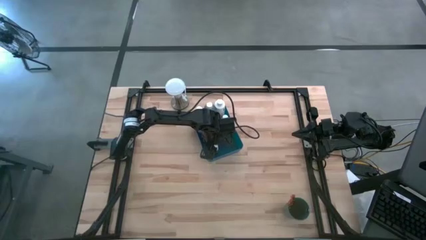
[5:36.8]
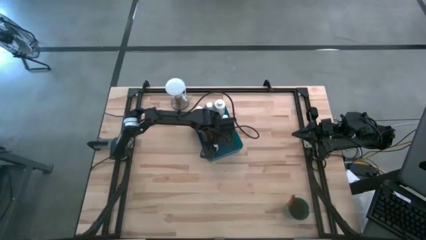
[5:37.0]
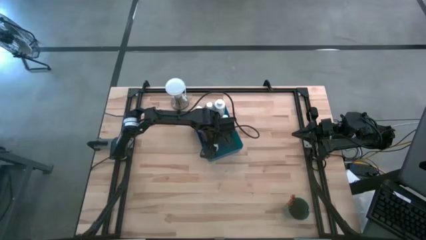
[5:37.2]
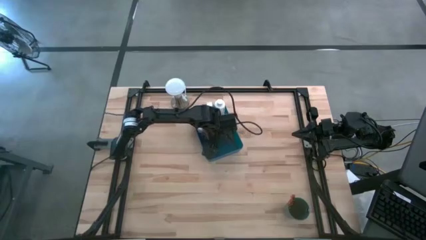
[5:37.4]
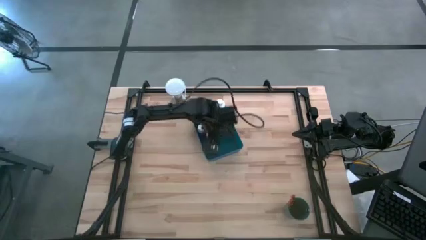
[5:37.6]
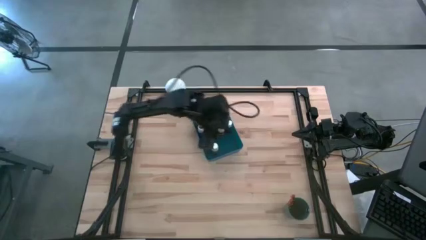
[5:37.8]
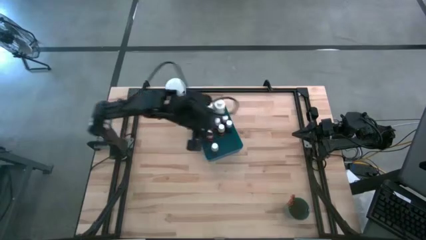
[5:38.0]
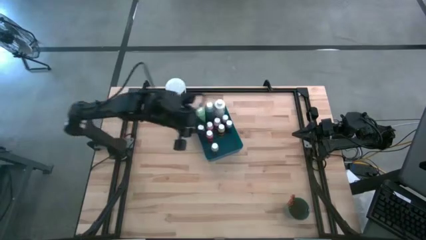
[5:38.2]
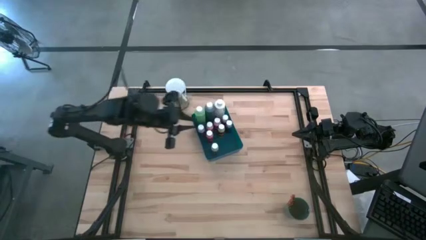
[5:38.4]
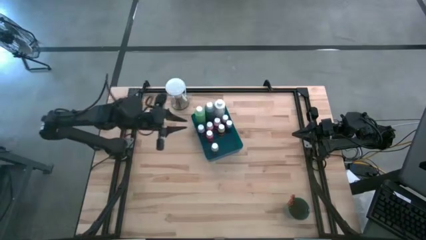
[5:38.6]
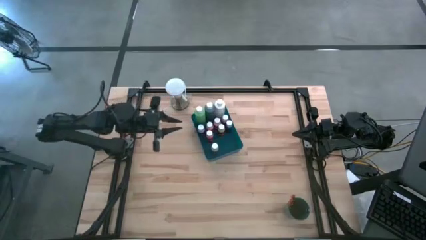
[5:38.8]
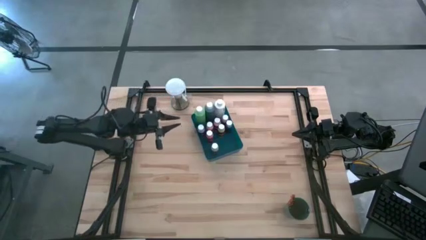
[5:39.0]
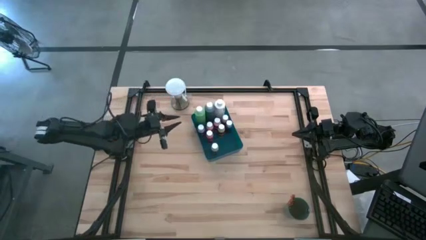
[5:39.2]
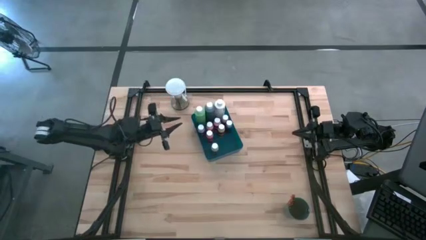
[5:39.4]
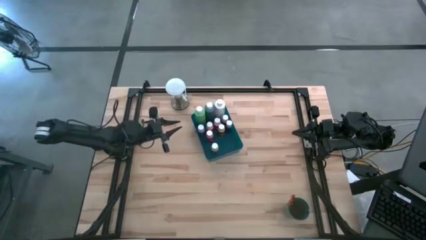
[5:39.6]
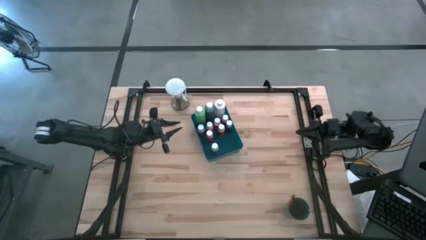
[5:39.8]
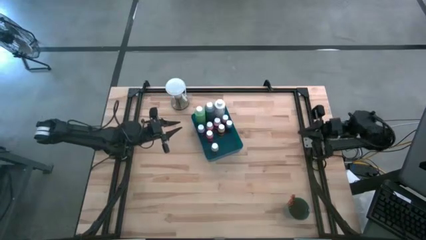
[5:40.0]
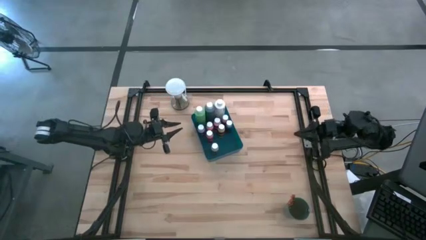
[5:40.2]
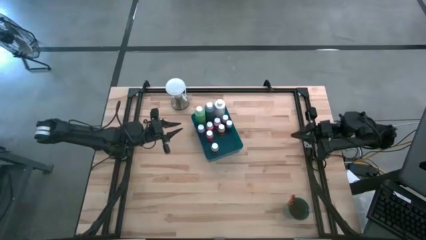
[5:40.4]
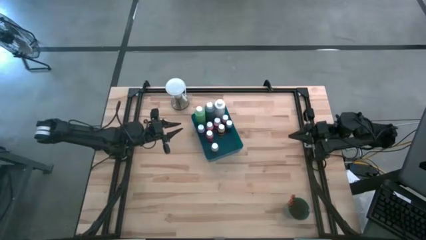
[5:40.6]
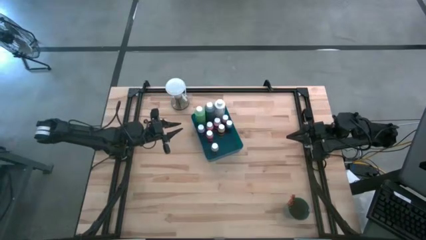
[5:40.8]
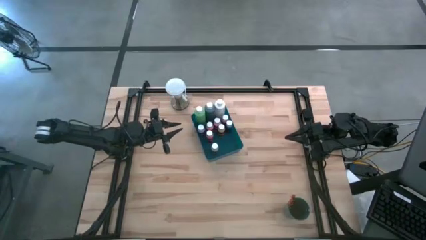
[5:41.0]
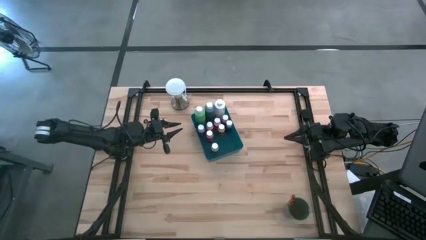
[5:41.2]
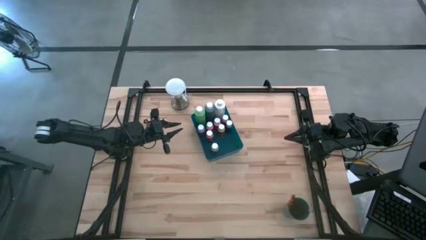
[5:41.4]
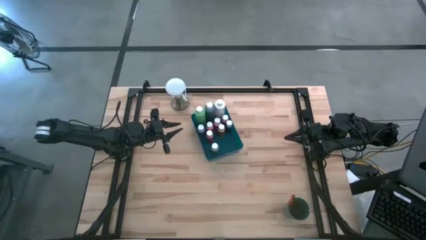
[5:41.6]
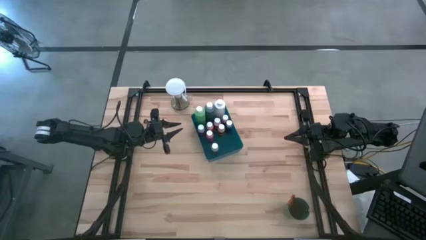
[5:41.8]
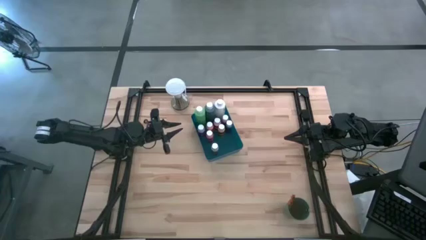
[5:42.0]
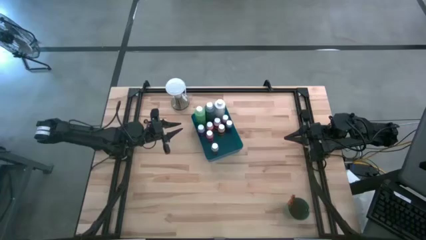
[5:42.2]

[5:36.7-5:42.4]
Task: Pick & Place Paint Supplies
Return to Home Position

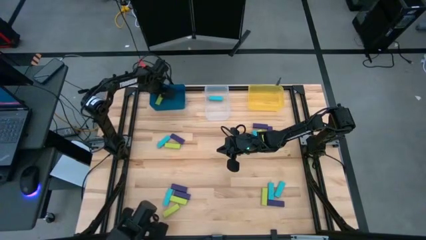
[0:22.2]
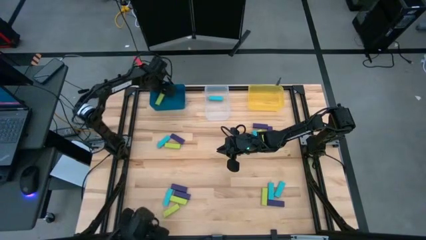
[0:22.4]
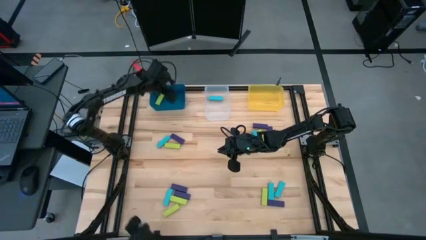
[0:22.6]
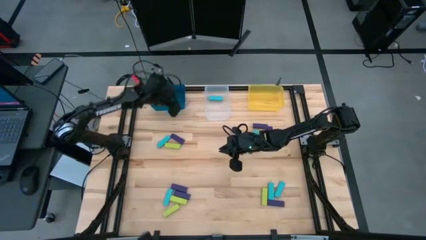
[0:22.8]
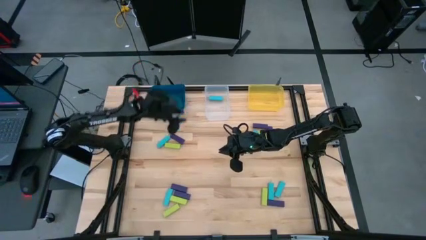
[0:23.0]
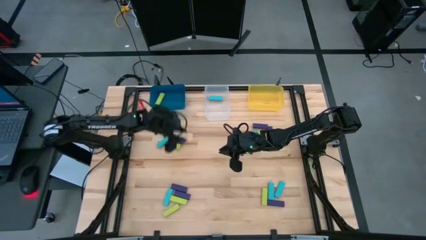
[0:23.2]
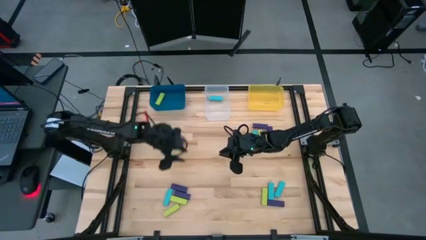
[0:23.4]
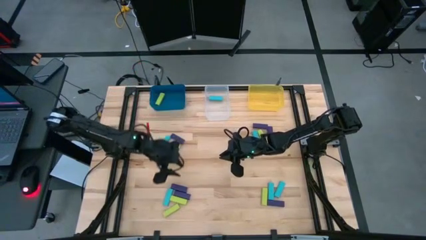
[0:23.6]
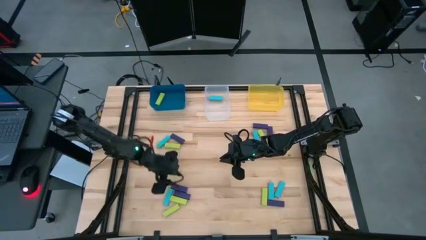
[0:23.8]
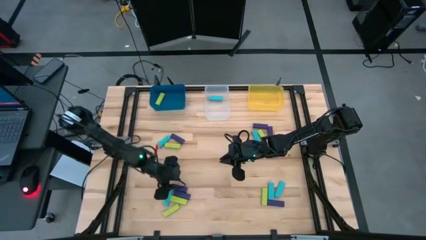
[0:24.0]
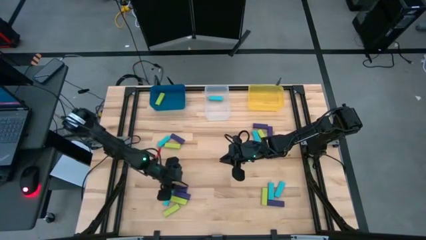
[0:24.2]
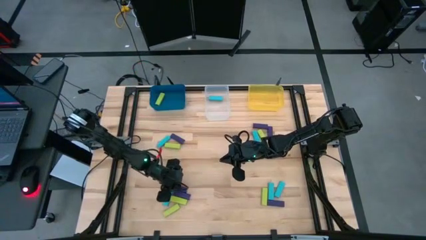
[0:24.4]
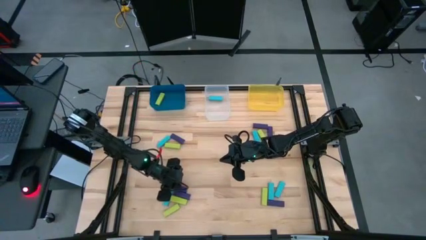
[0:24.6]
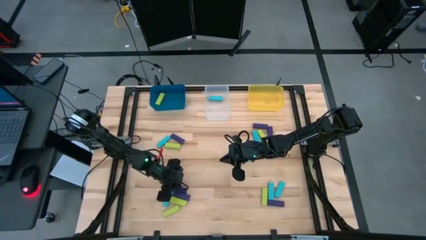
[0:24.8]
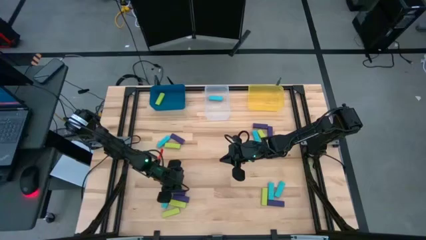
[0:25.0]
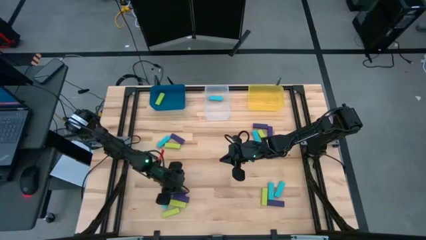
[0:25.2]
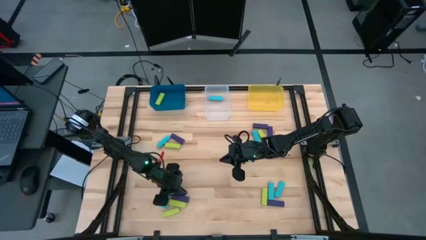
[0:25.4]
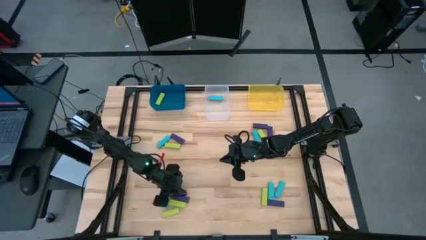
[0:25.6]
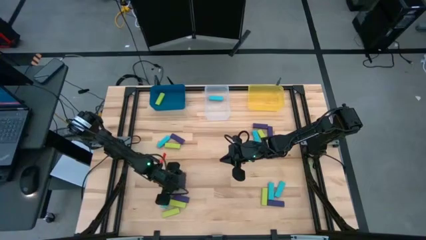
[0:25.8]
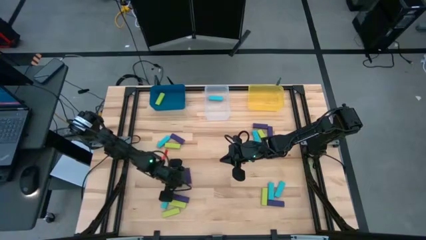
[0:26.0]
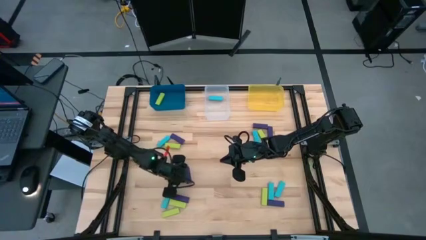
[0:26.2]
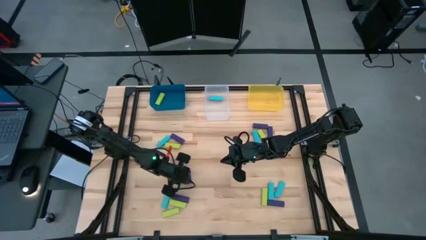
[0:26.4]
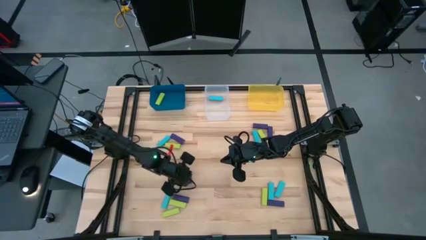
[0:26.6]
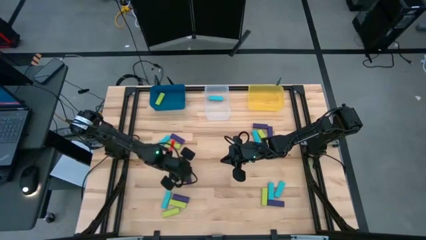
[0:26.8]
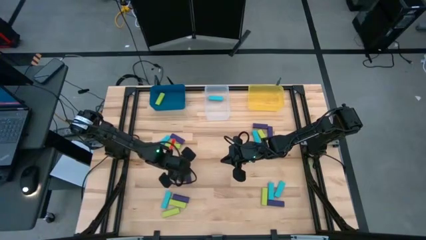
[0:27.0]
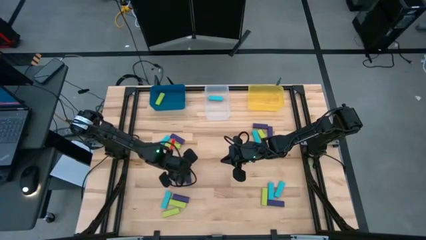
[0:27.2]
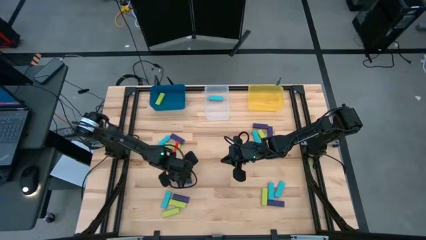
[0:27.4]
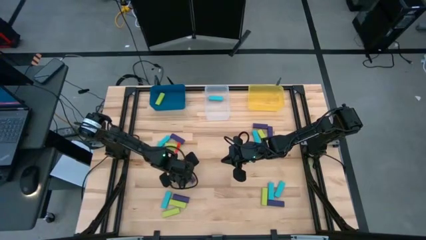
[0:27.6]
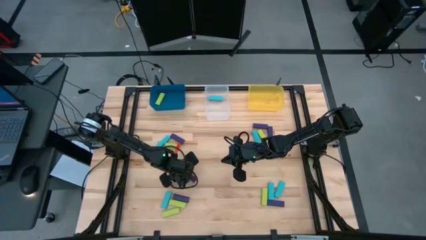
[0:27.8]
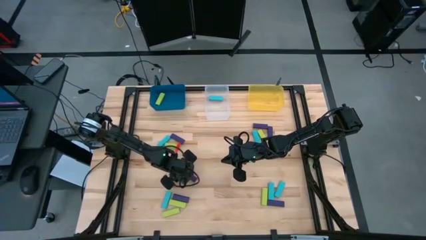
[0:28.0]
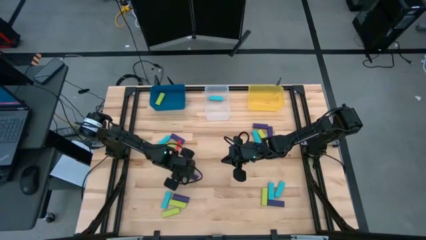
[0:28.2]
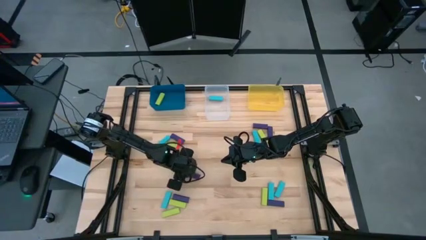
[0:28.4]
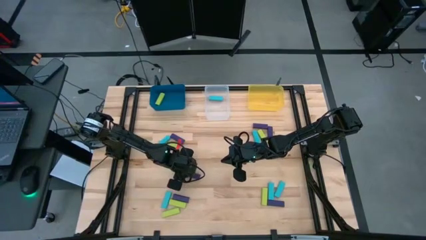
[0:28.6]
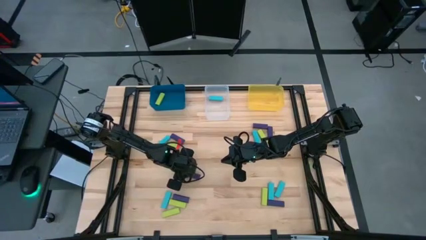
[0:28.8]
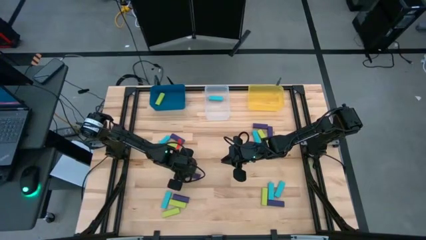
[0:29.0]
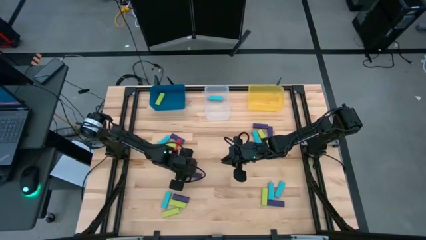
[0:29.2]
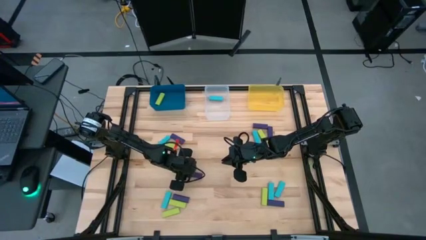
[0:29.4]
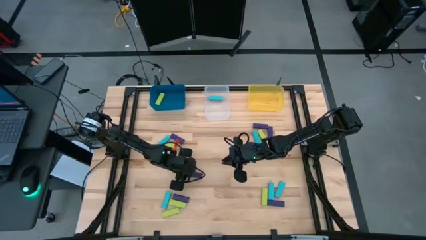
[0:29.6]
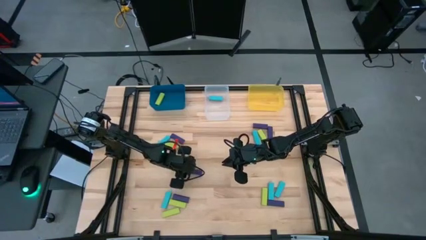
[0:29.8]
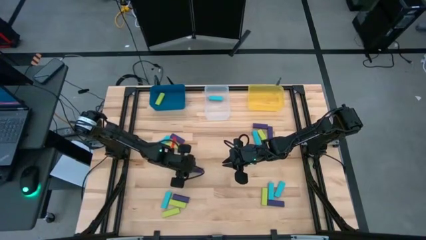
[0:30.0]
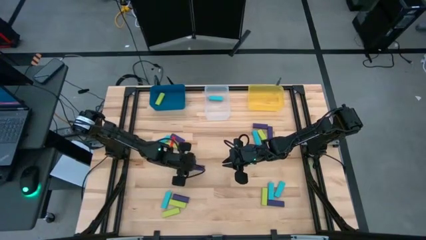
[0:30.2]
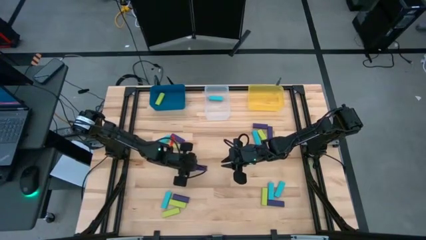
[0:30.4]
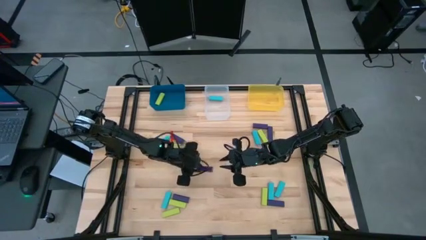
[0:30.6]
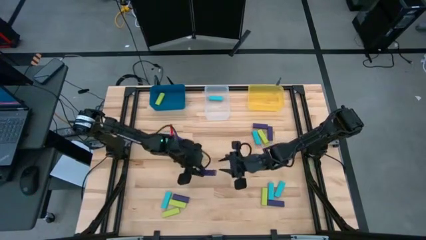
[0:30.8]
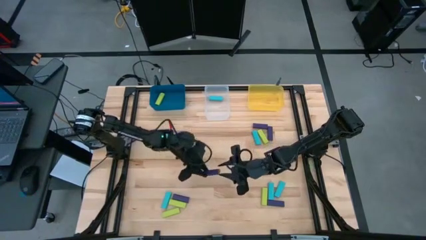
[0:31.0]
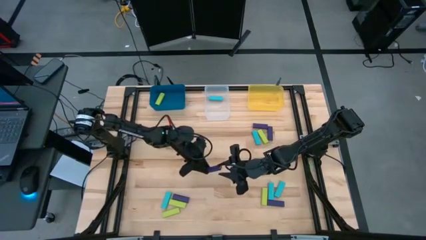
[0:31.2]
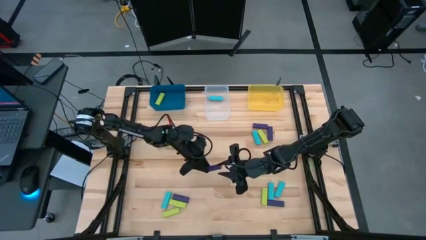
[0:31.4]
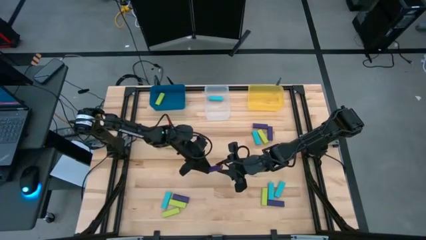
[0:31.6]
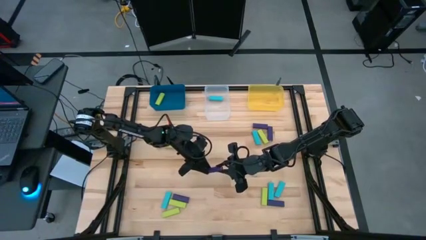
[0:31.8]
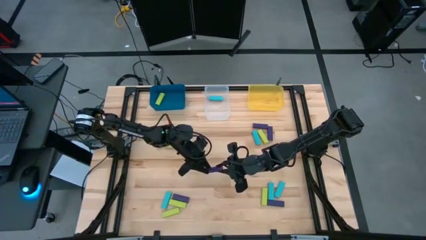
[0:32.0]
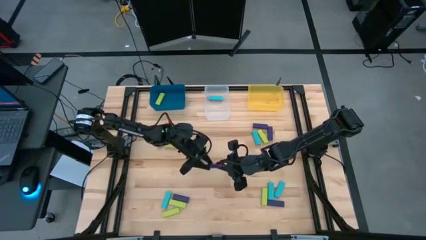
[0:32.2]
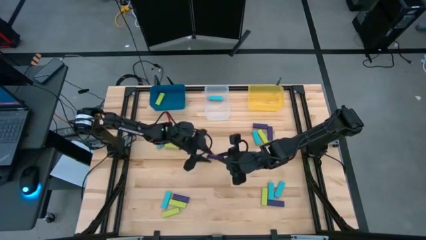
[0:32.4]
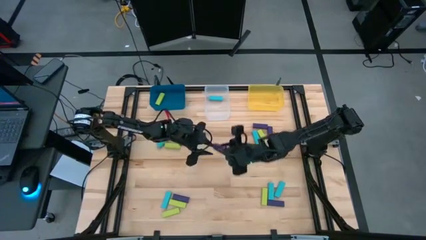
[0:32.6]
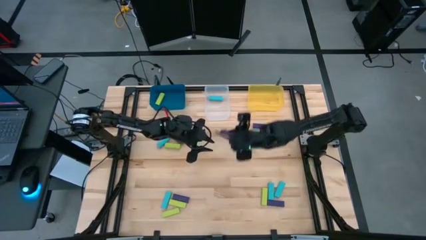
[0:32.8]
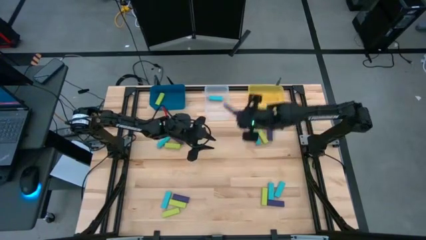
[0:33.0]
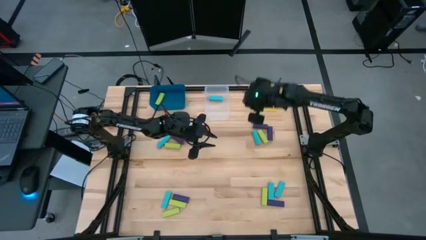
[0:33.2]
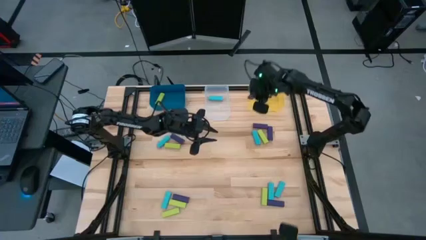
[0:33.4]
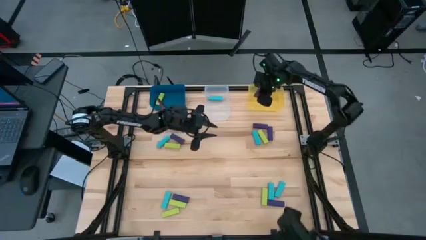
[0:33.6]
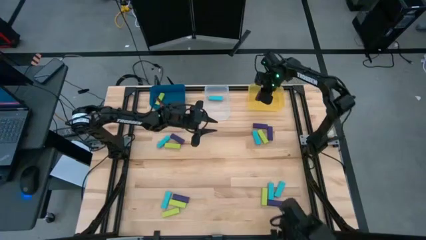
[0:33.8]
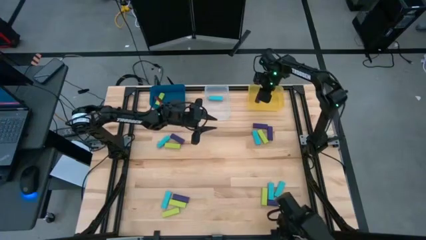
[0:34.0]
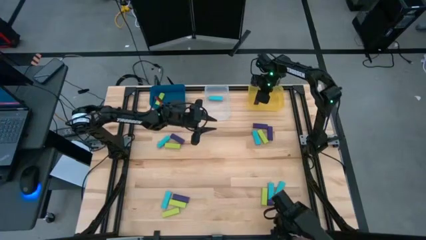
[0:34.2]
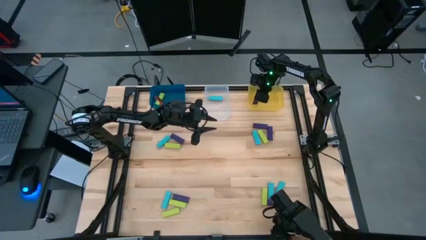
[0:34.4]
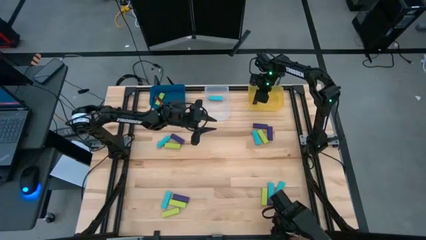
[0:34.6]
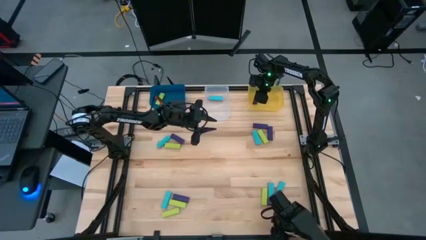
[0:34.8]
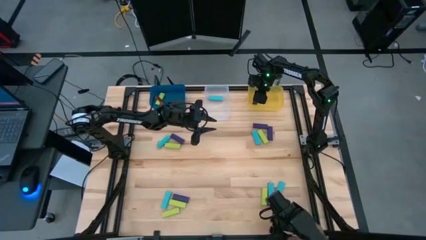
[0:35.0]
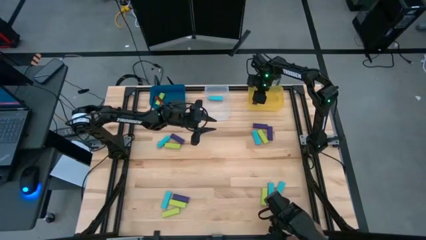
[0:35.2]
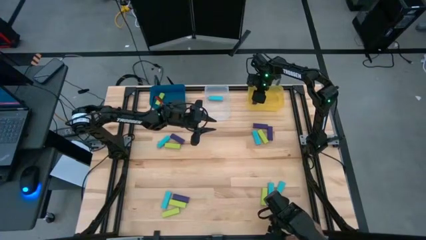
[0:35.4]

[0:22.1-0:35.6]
Task: Sort blocks
Put the violet block into the yellow bin
